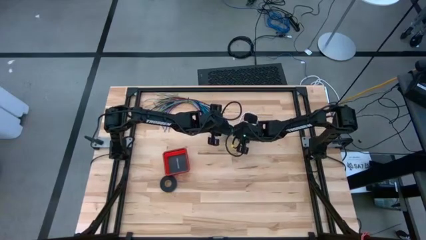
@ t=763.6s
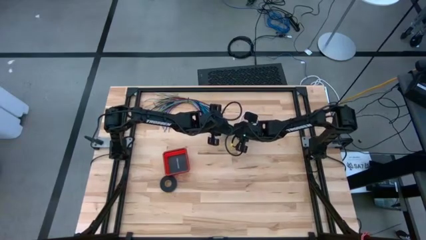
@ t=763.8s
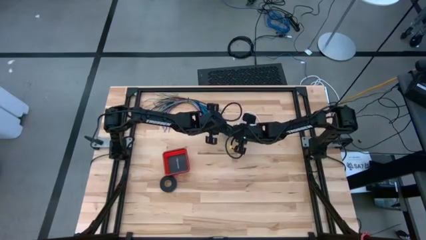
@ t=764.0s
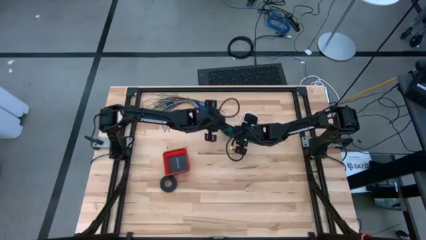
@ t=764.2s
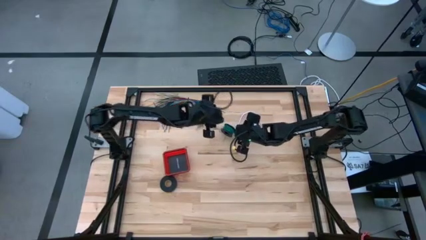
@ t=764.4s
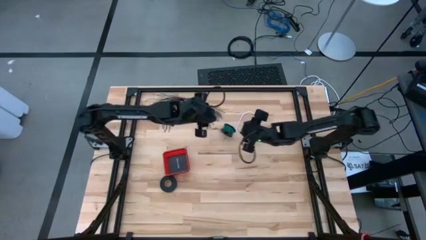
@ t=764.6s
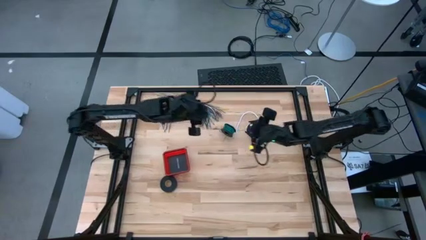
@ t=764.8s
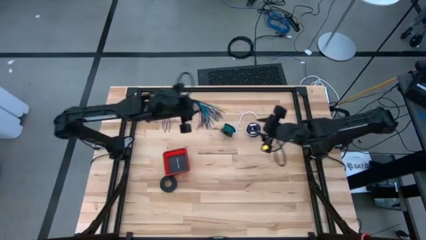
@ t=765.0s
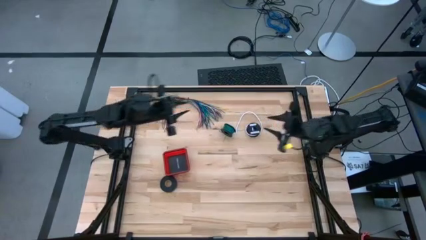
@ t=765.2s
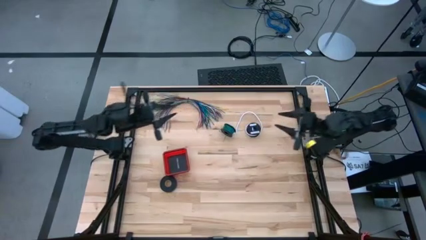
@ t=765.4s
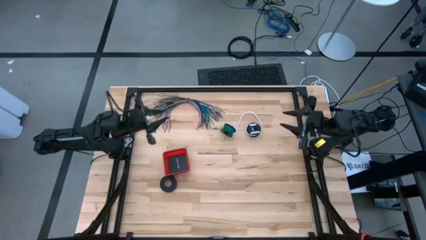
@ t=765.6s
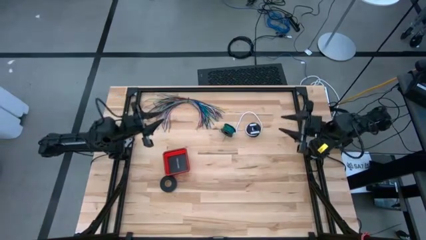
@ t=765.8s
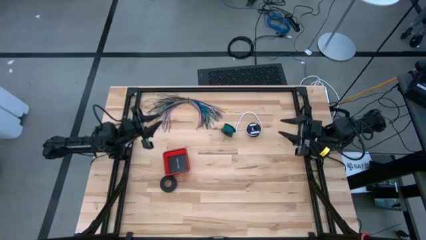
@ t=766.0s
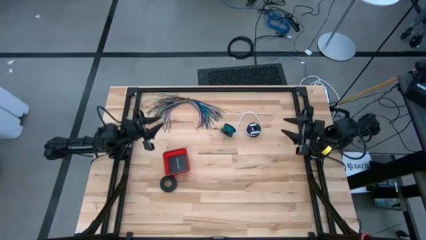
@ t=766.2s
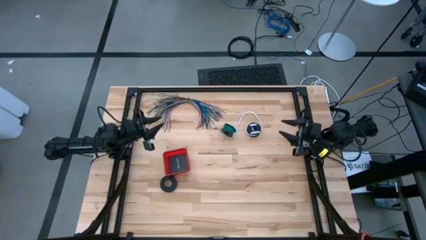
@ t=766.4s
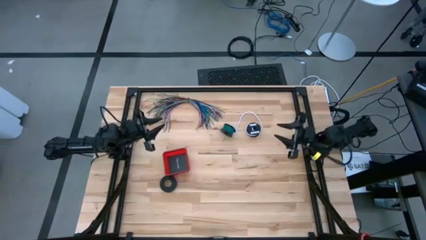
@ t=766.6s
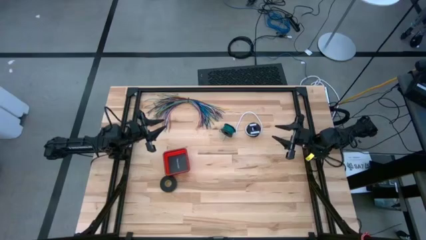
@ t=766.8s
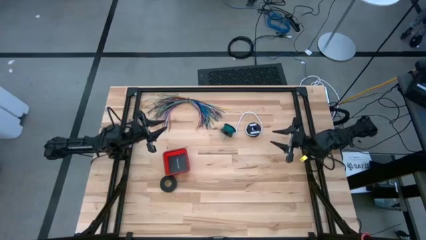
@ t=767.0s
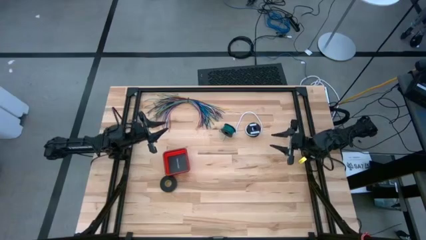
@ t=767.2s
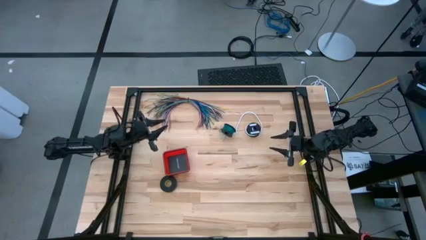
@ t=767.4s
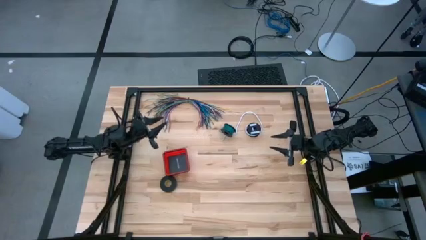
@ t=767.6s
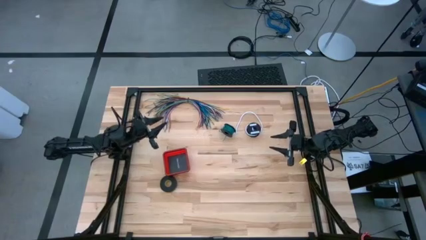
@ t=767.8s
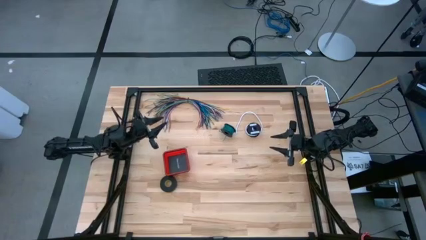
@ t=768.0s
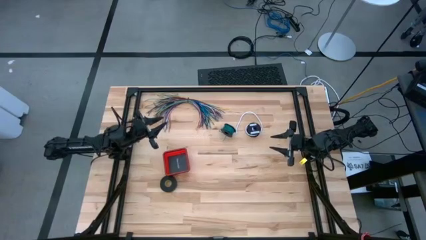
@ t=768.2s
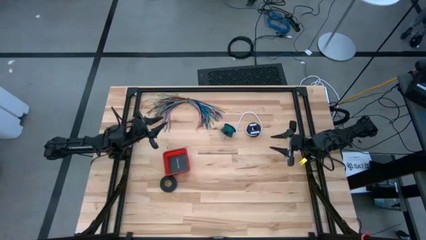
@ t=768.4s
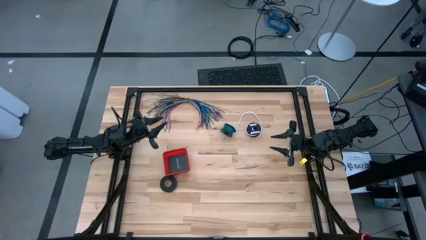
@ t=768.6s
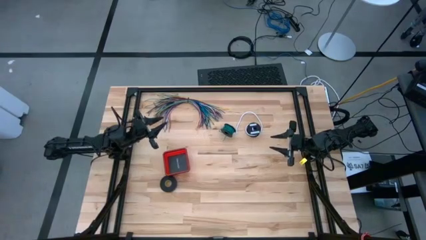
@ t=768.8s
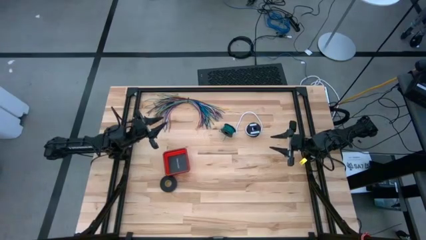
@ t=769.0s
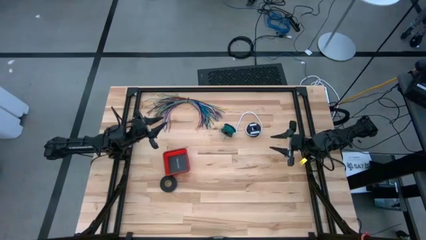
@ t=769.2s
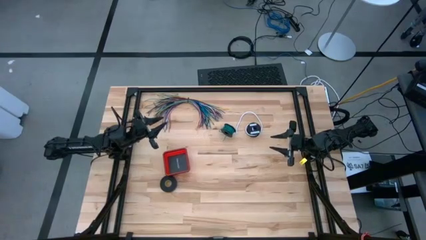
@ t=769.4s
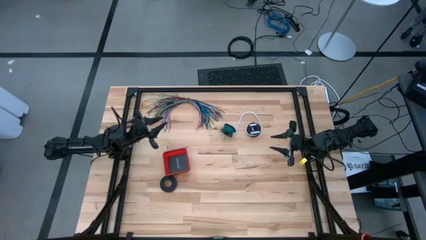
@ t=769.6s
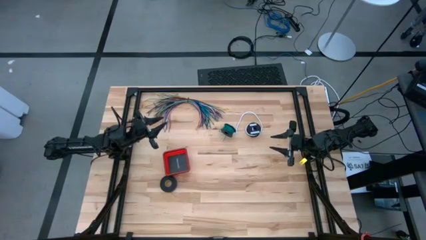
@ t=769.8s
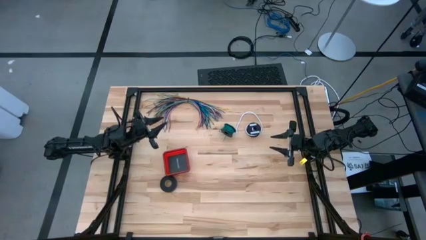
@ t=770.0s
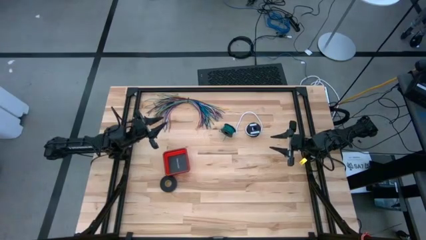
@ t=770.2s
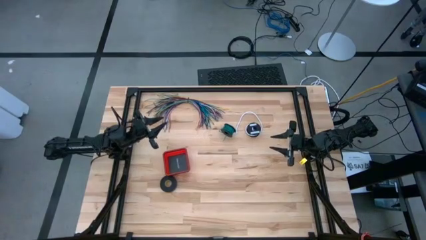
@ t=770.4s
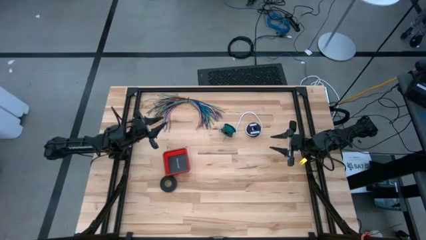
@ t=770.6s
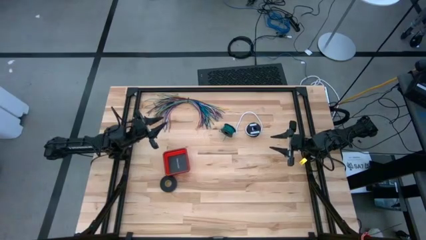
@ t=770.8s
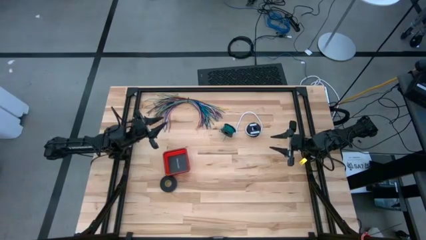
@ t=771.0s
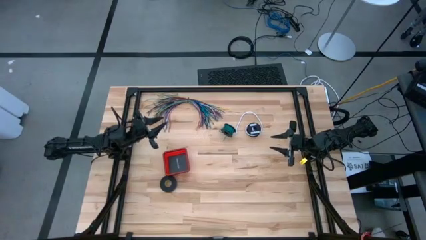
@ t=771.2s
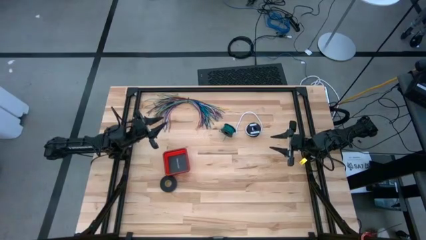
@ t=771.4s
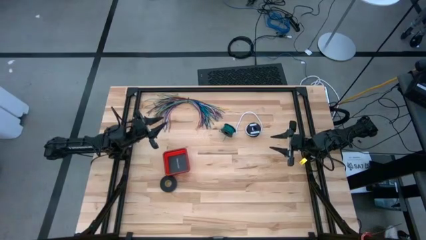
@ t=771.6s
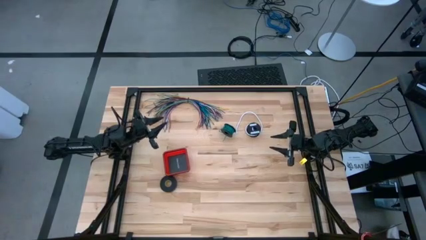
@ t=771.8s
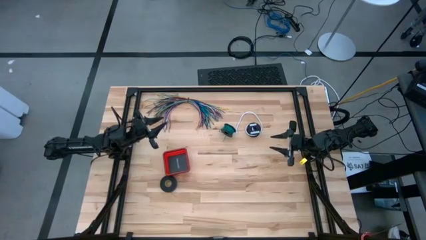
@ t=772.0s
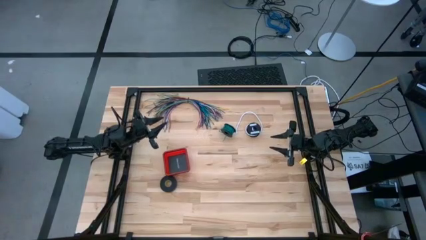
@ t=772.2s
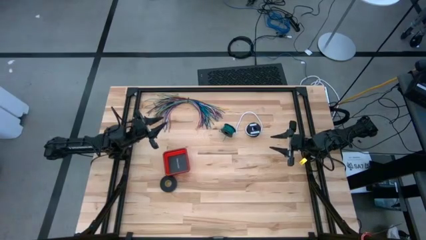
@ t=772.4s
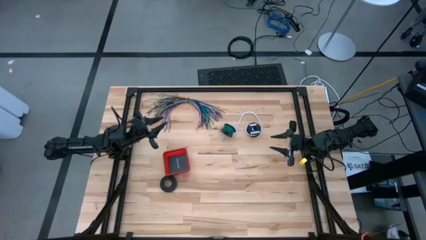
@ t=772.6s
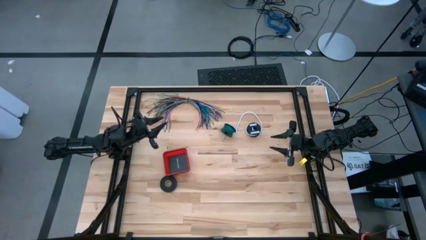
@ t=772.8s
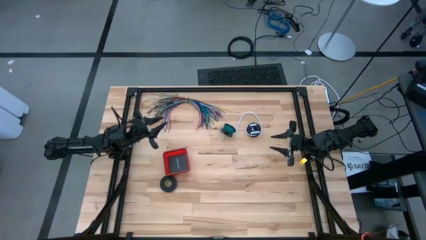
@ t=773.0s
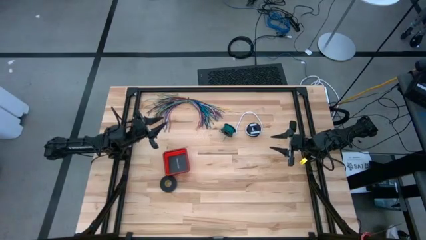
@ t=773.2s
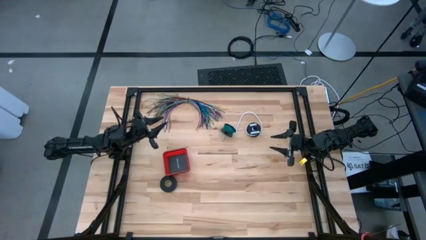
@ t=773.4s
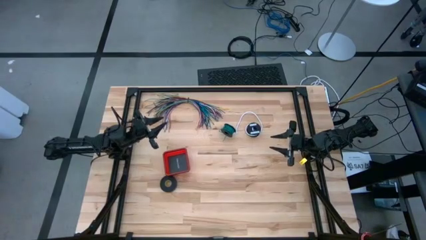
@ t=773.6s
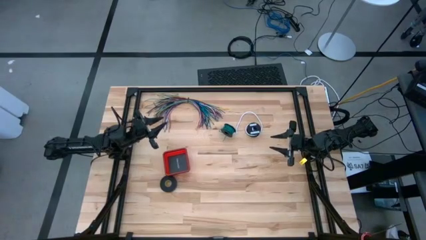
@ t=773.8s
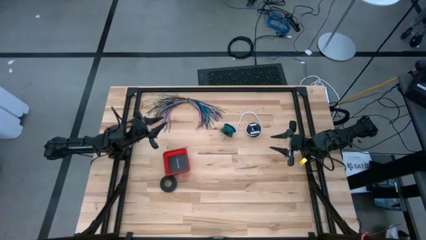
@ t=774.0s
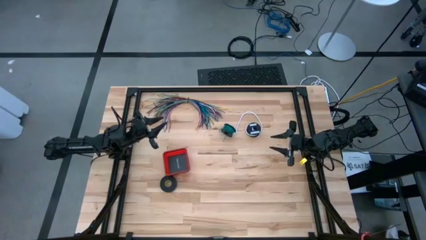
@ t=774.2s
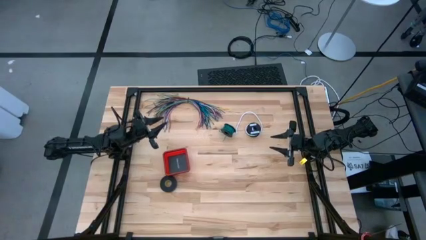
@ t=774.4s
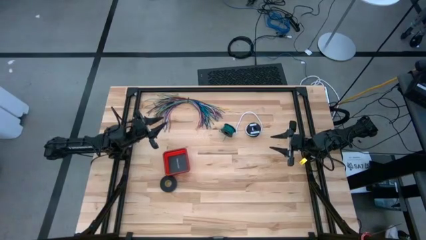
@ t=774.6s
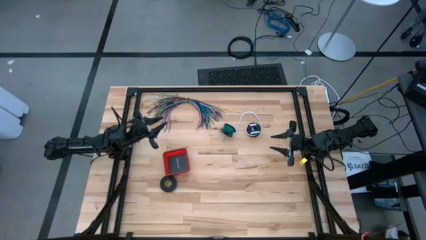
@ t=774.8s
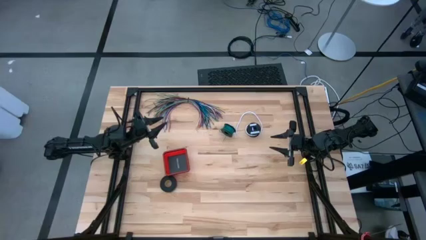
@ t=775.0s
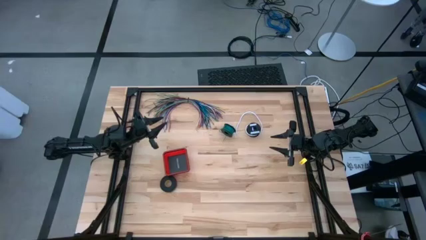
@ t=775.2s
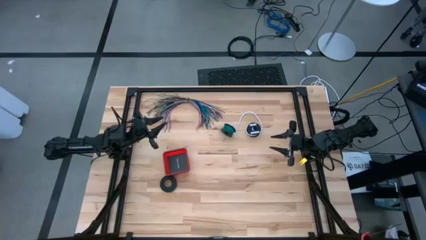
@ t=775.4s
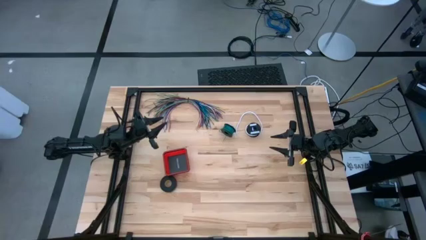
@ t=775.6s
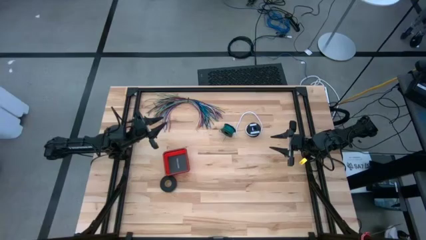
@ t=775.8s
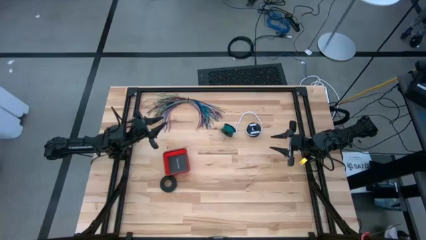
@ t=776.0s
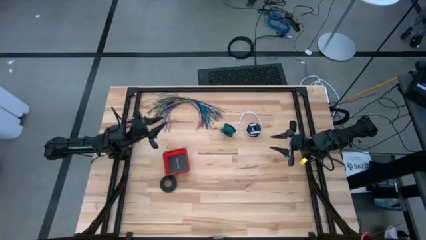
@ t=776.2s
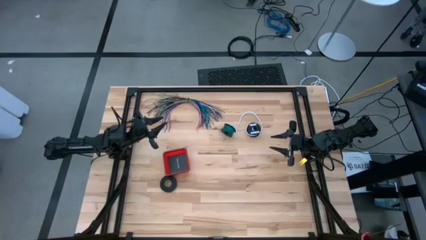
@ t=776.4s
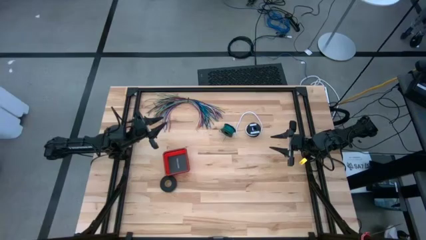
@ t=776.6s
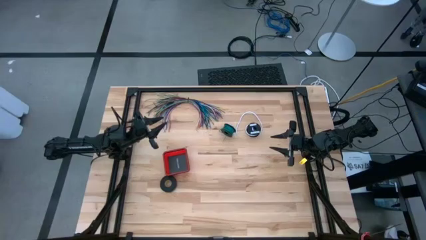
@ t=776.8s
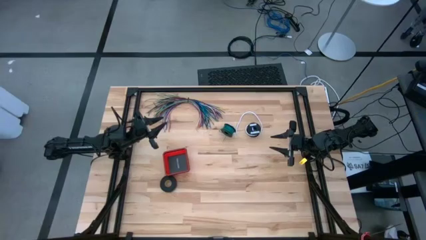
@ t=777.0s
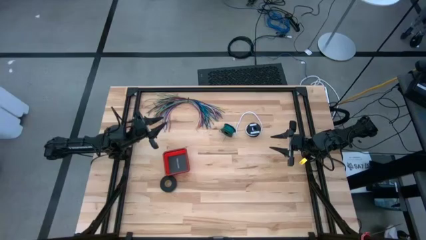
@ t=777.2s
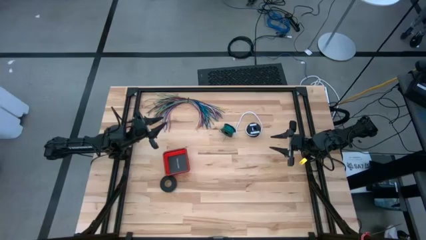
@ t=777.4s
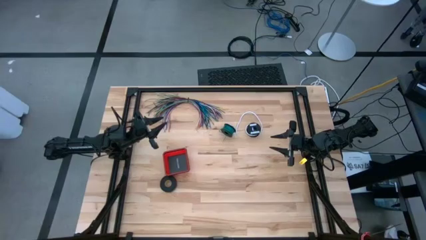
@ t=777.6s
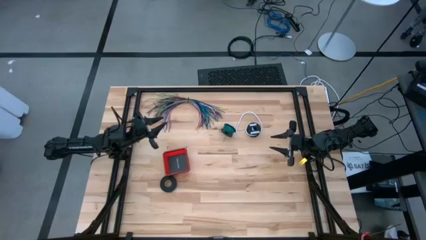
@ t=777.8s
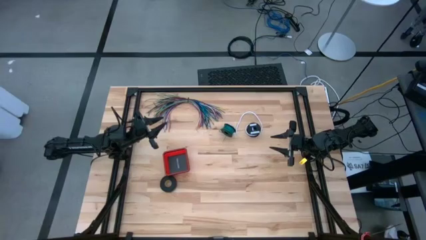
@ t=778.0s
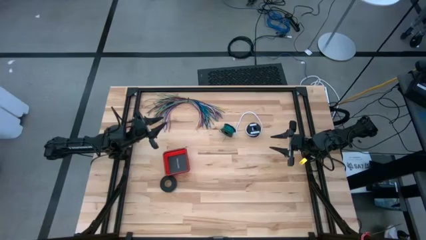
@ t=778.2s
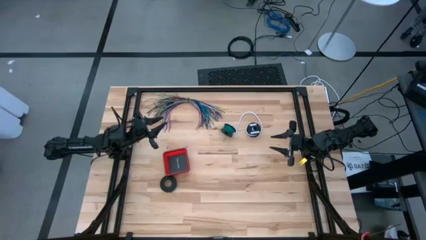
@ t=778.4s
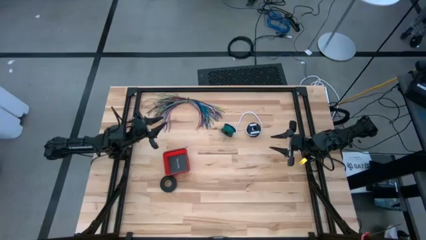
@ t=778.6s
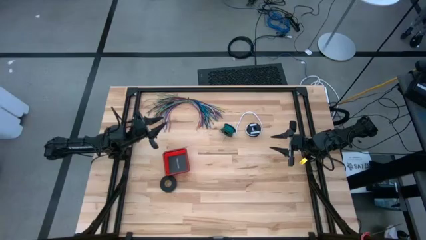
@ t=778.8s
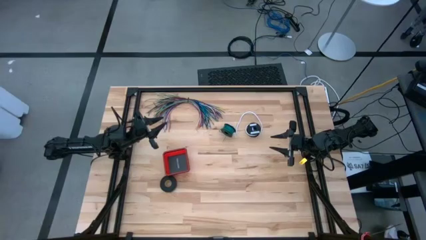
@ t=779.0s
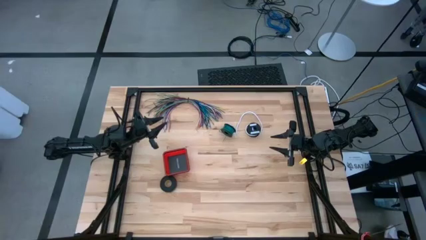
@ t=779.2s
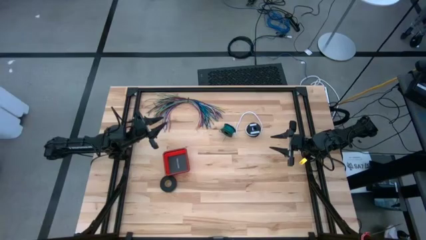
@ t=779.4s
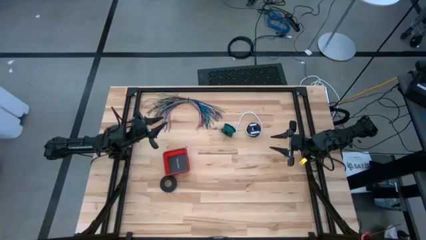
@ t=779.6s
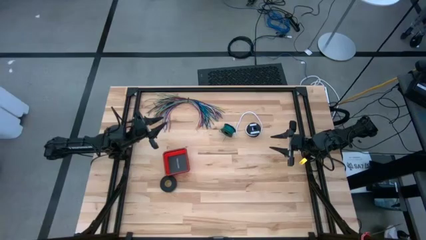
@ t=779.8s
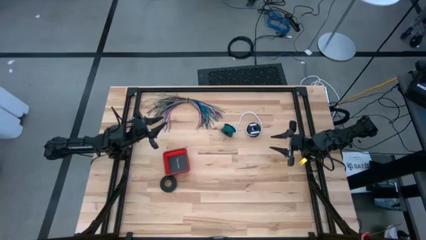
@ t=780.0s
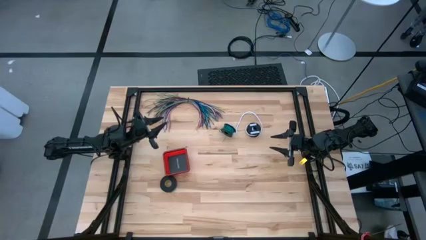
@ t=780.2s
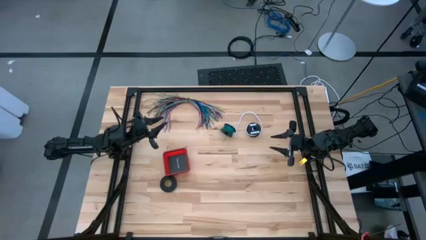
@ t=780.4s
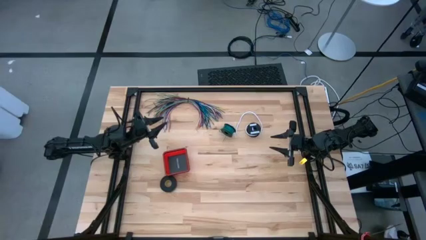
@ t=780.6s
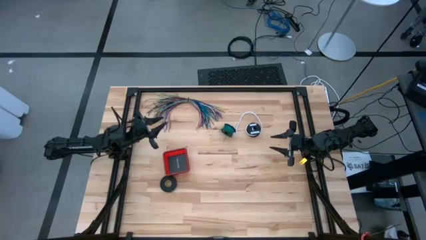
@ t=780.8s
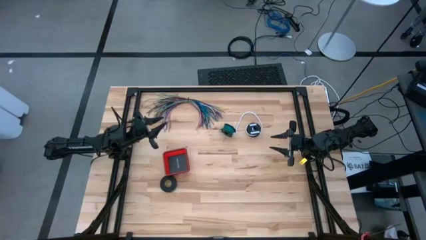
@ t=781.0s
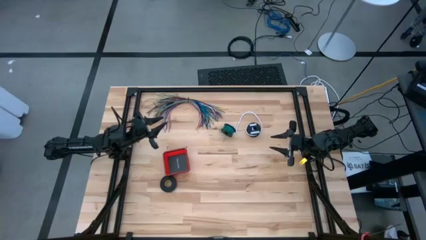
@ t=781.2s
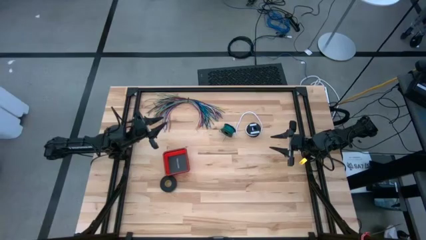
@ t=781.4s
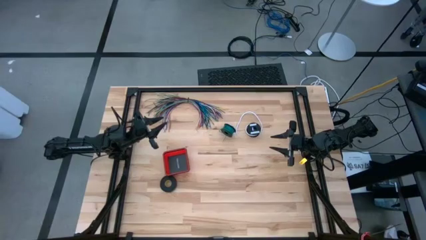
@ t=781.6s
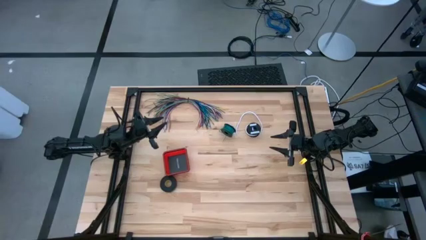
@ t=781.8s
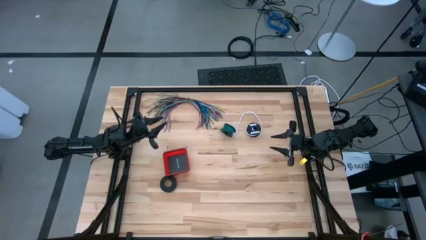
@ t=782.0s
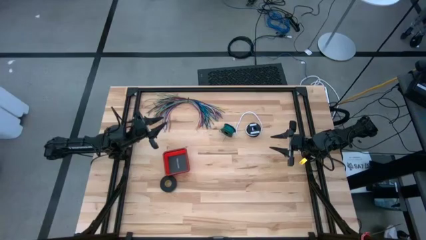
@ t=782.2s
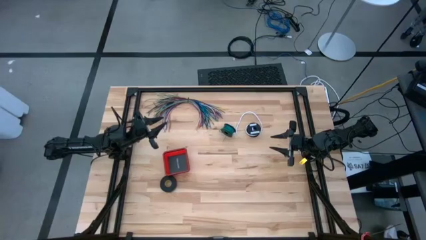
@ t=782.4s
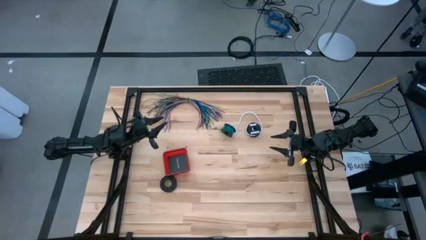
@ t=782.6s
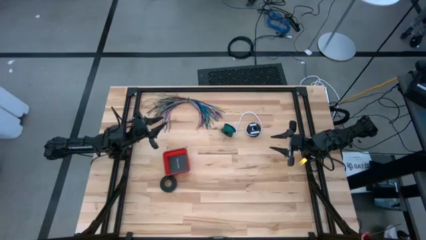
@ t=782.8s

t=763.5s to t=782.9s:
Task: Coil cords
Return to Home Position
